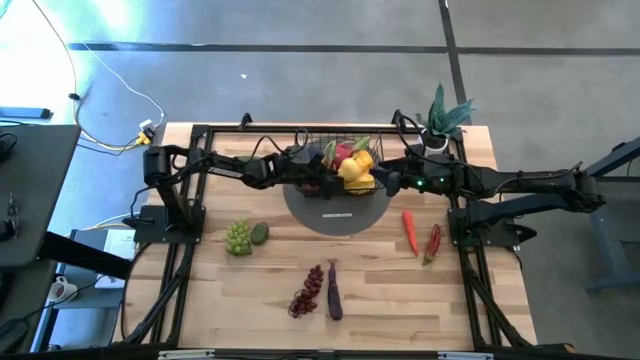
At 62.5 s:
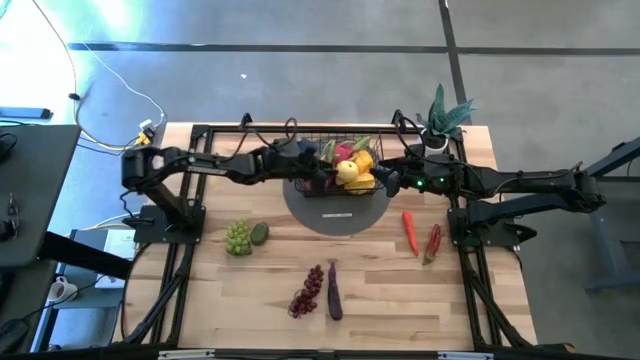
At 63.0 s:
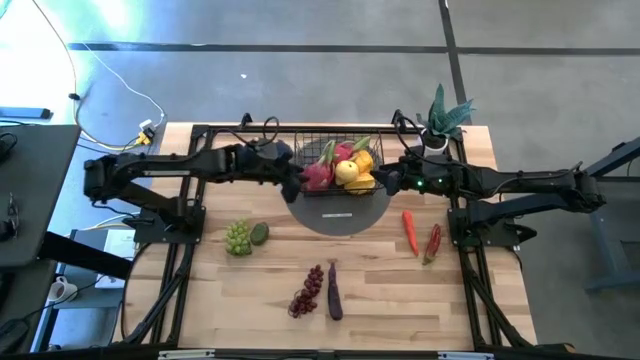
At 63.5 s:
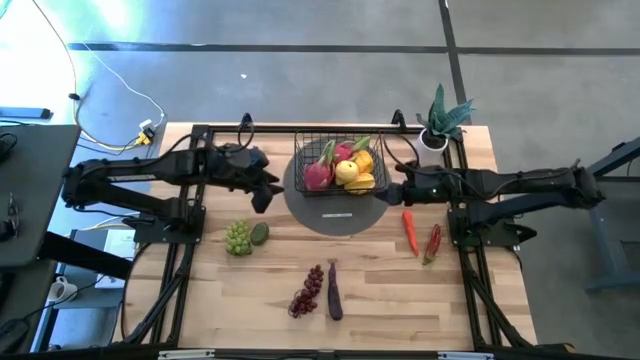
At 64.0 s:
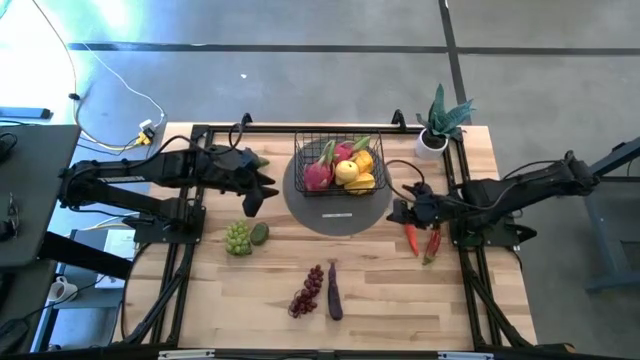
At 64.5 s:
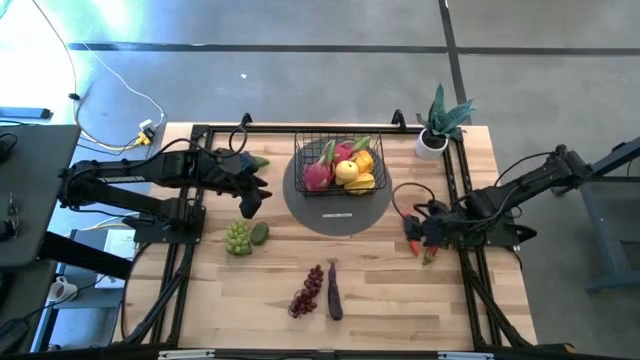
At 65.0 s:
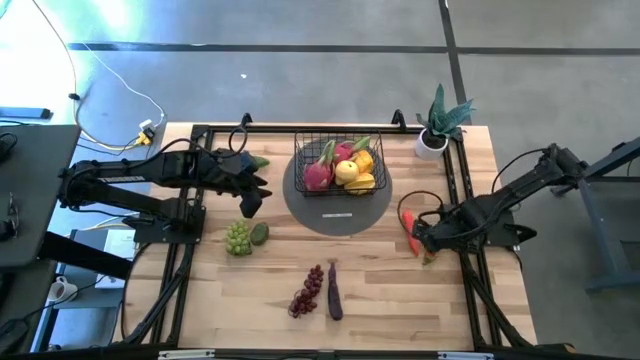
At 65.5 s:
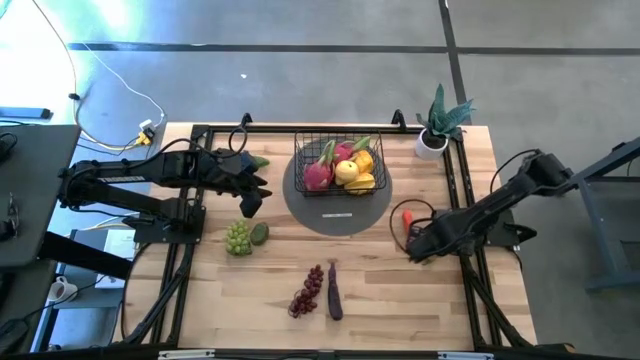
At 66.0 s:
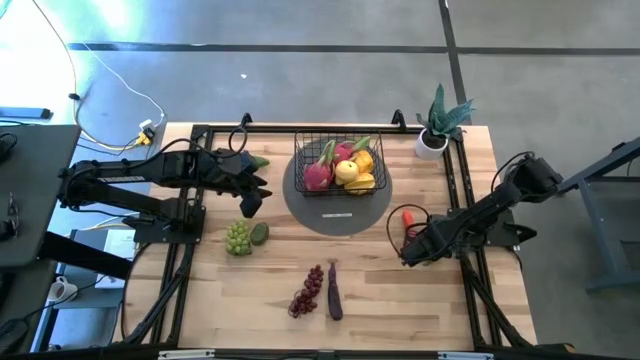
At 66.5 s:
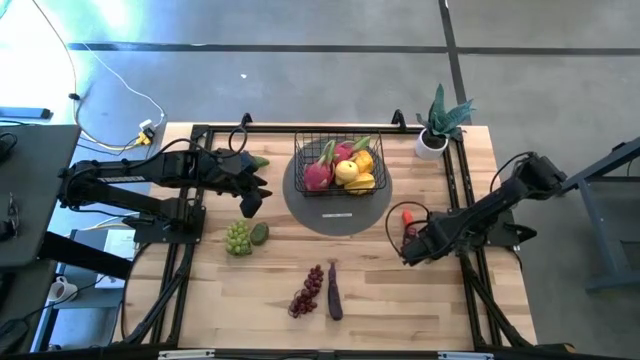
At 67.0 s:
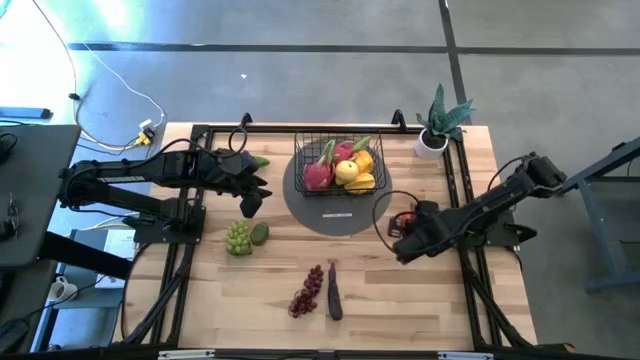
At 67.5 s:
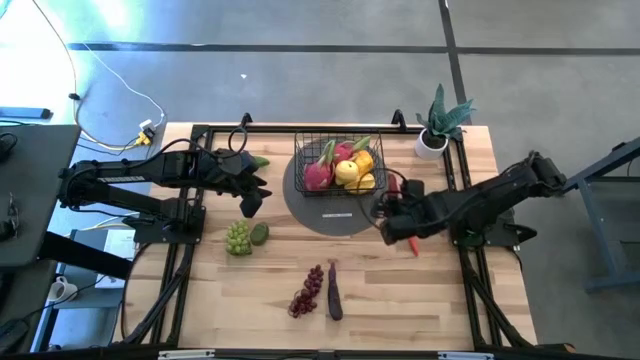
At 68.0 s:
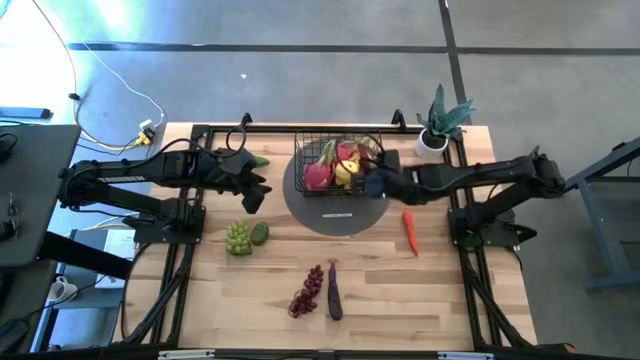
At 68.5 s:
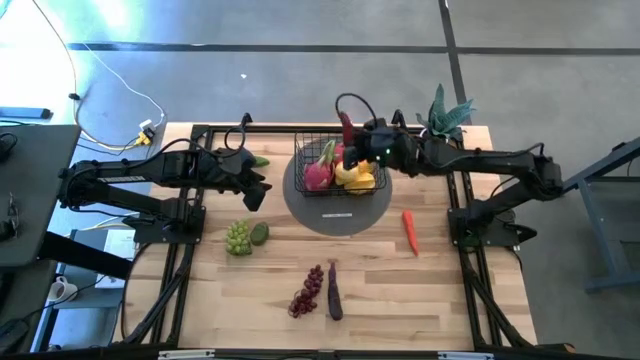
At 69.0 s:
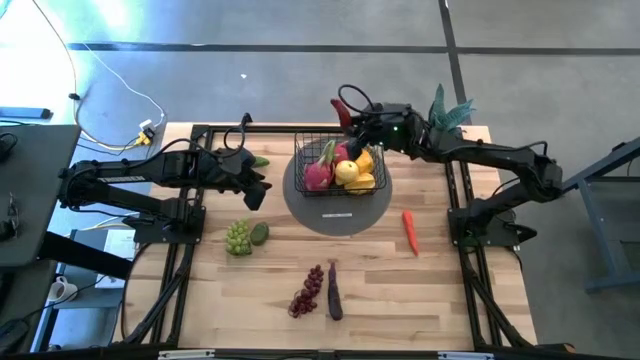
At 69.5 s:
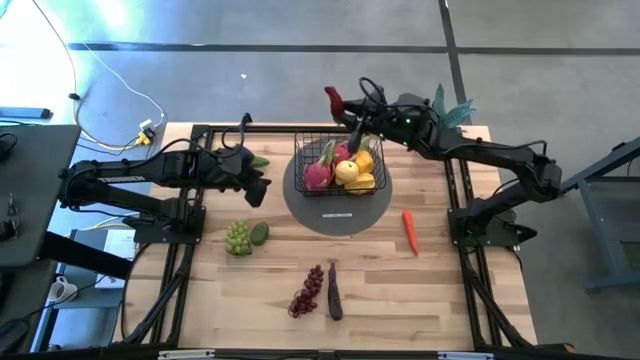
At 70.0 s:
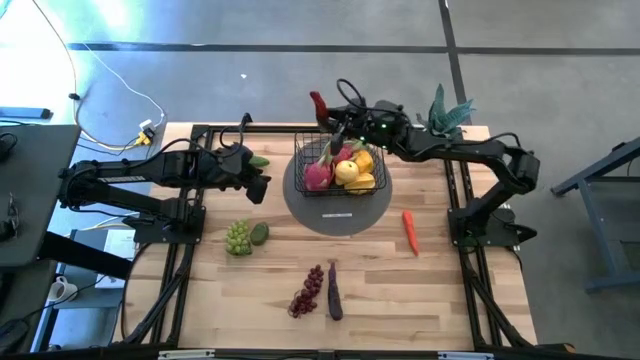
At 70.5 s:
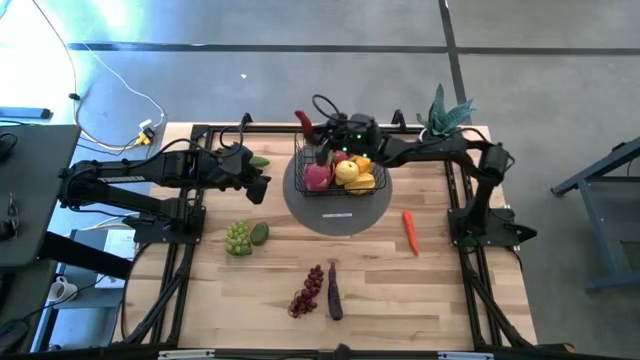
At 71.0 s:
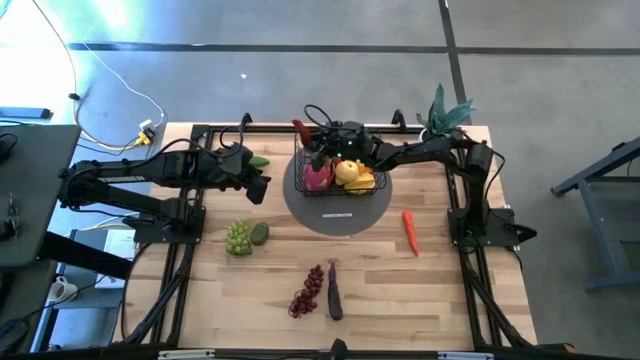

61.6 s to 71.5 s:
Task: Build produce basket
Put the chili pepper into the wire basket

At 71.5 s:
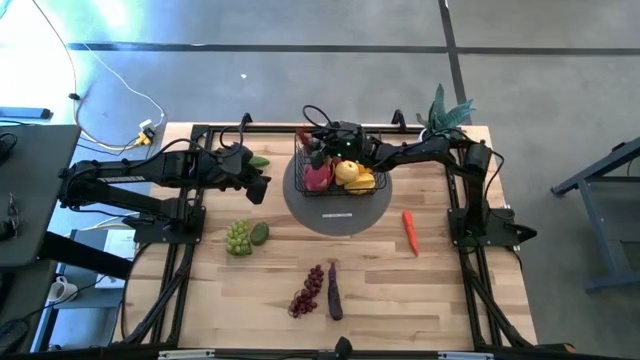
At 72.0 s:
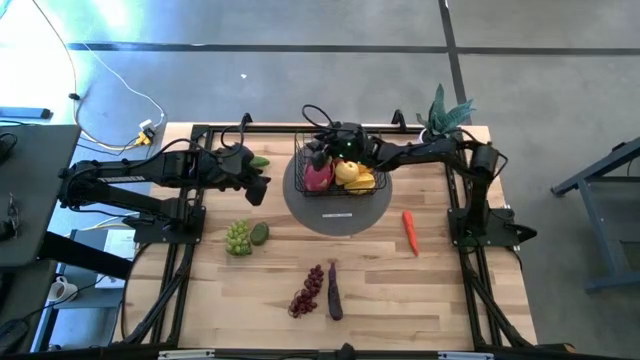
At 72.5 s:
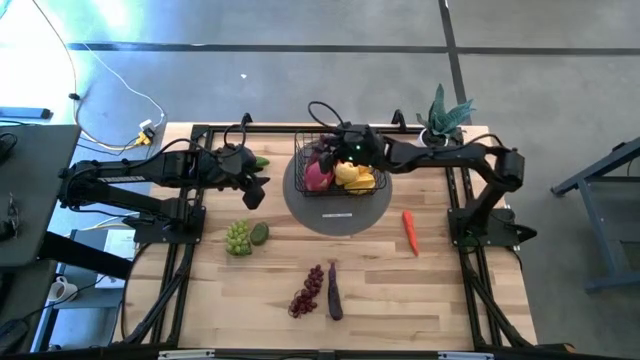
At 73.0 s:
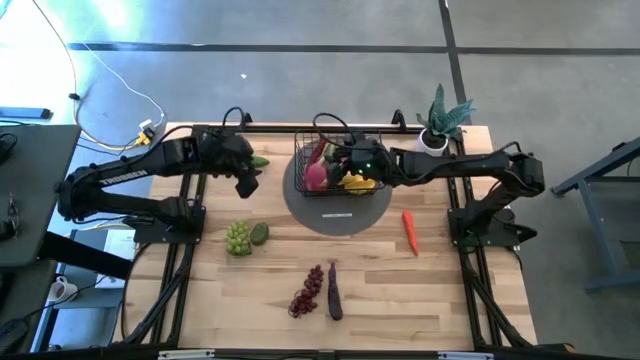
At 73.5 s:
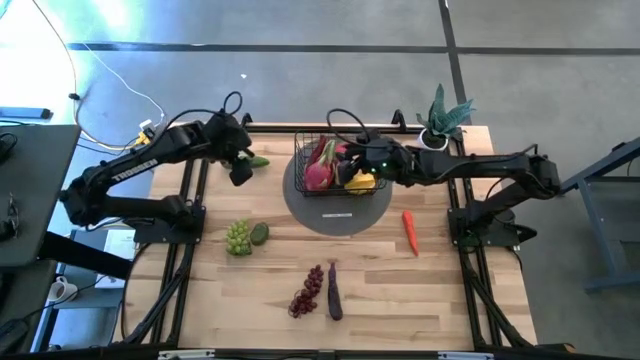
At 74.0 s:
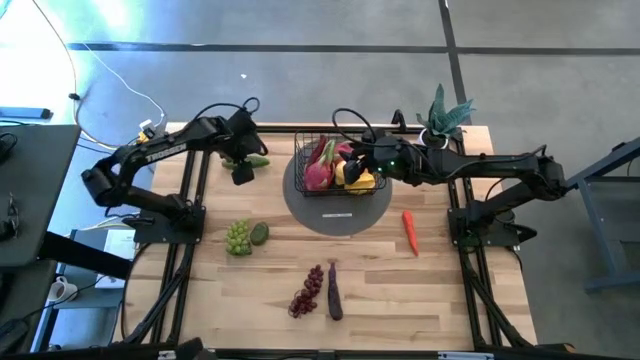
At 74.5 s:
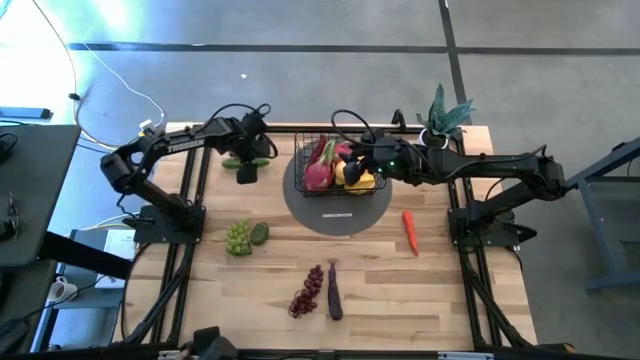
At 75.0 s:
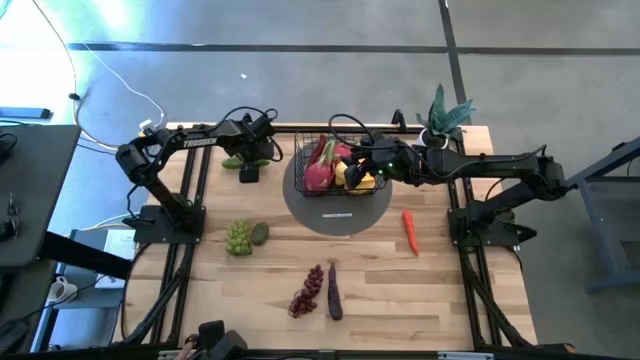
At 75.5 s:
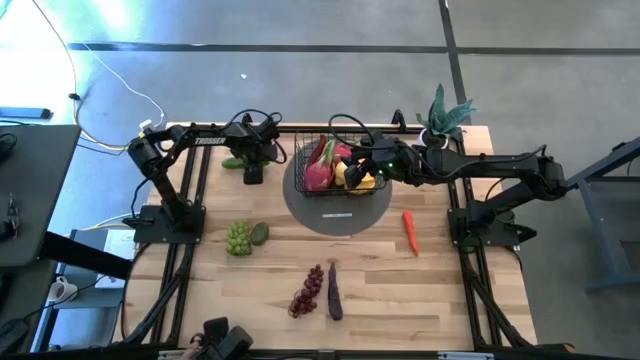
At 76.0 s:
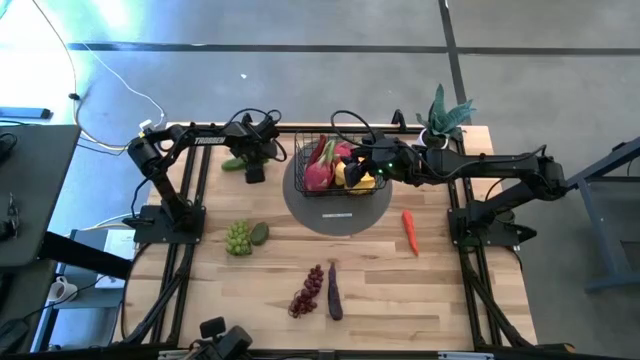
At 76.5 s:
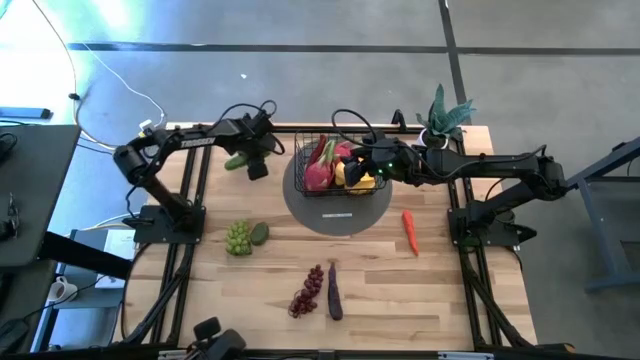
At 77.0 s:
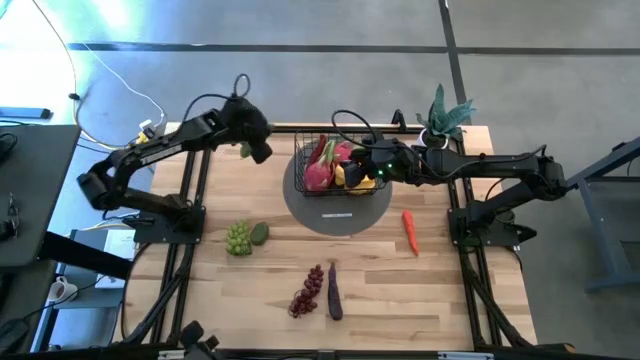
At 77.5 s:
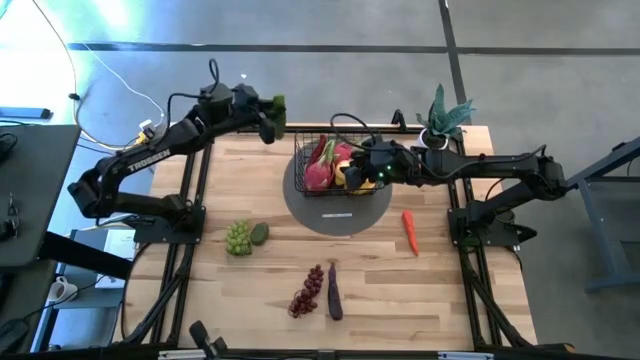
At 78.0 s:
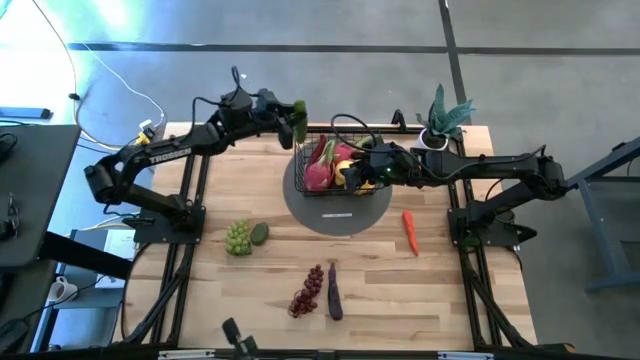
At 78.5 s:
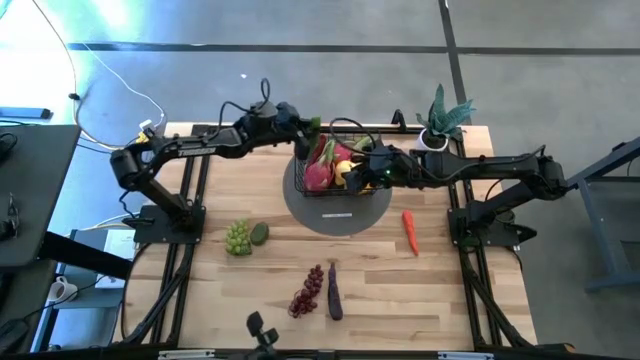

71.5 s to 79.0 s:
Put the cucumber into the wire basket

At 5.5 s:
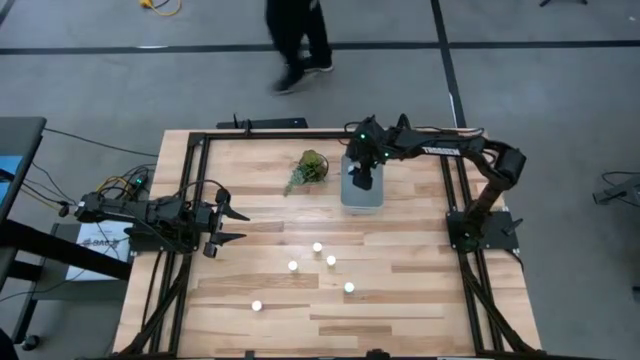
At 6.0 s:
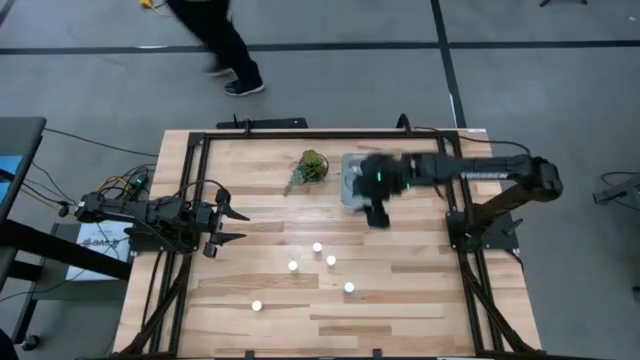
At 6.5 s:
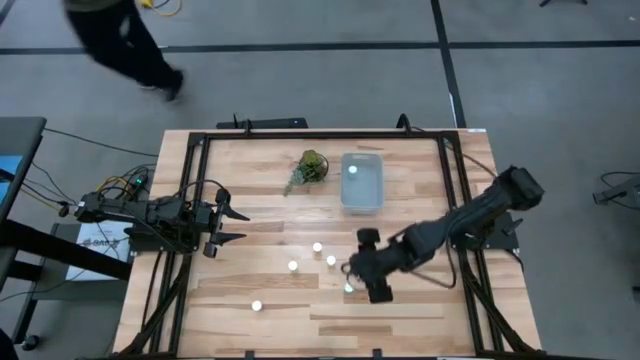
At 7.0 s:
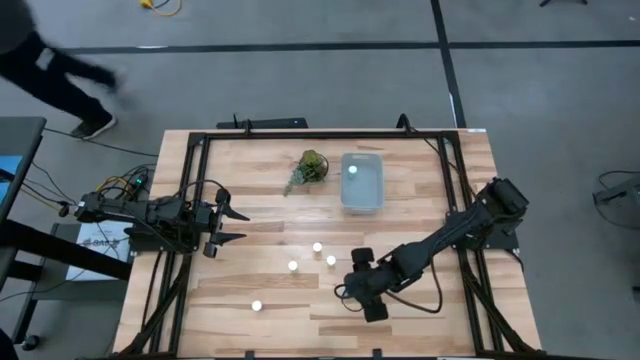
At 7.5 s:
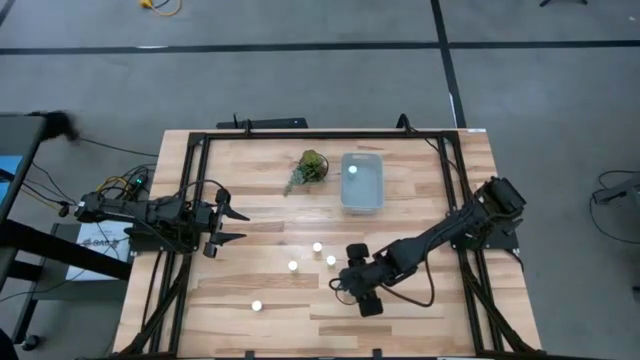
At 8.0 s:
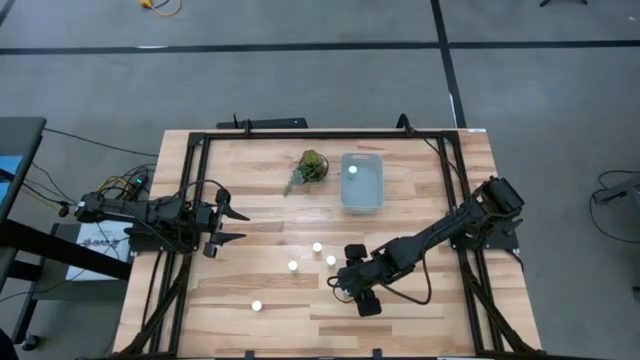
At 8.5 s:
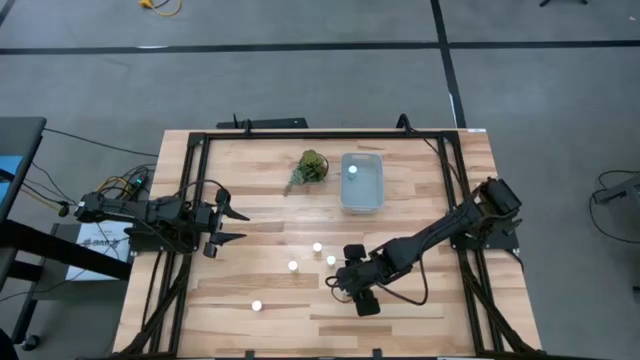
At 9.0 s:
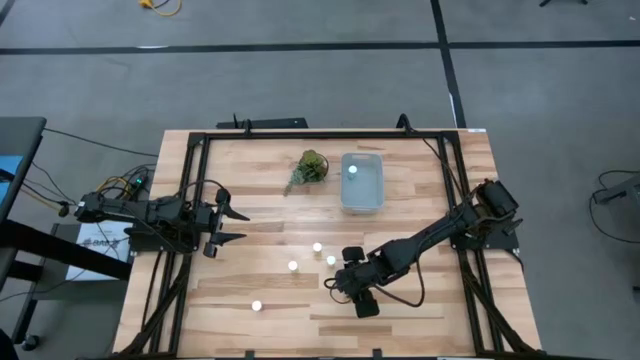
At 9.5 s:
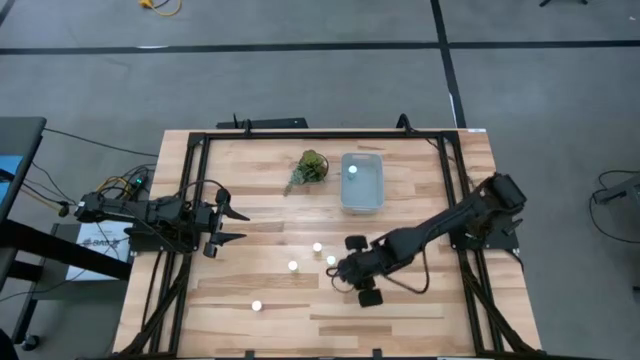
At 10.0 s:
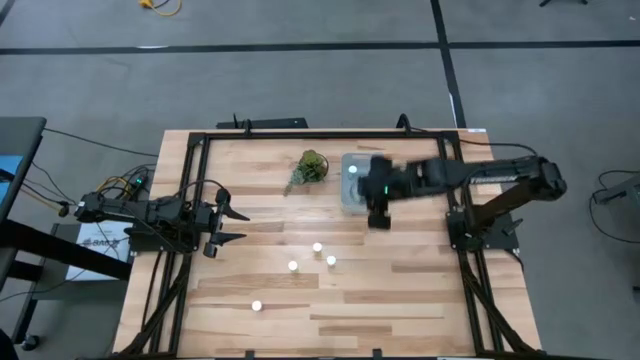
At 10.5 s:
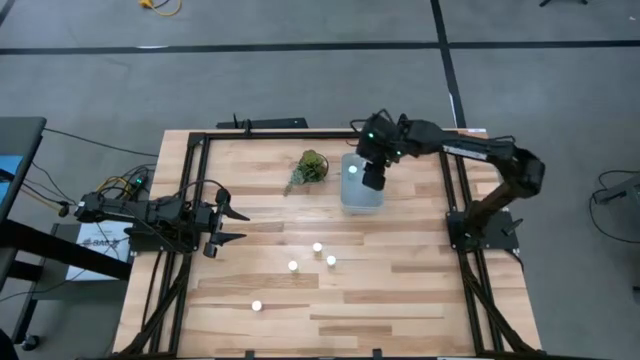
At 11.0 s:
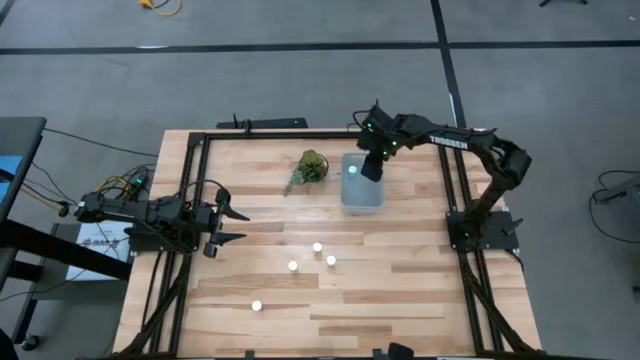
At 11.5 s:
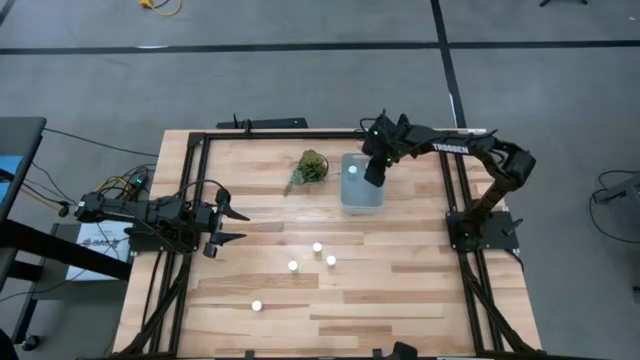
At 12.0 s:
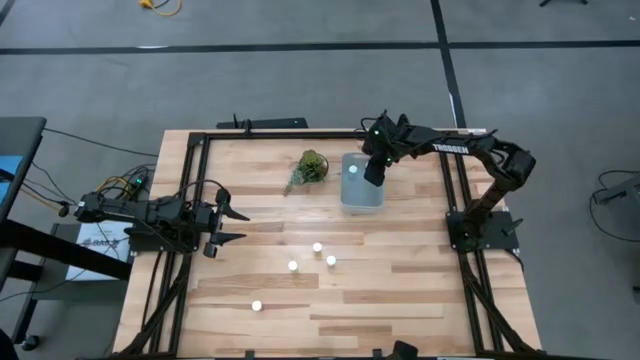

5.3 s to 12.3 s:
Task: Pick and place pill bottles into a basket
Put the blue pill bottle into the gray bin
